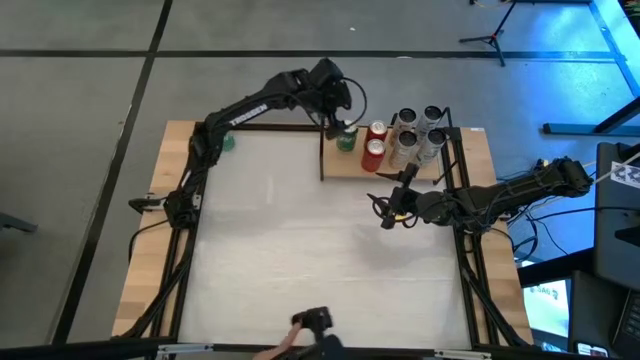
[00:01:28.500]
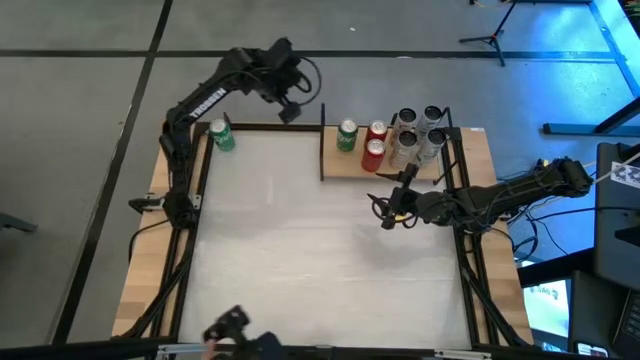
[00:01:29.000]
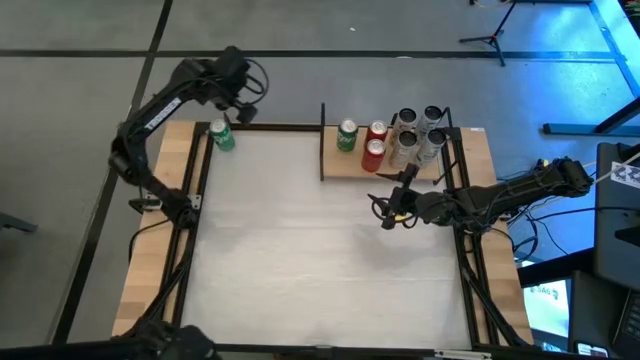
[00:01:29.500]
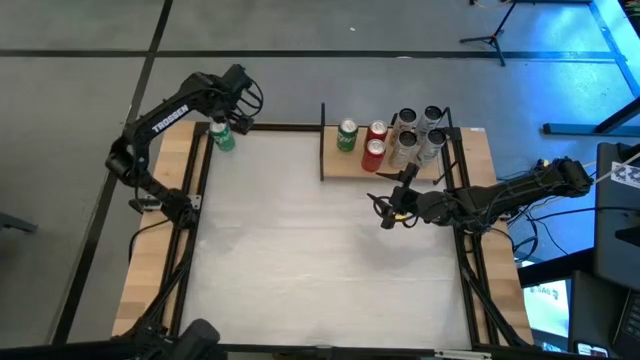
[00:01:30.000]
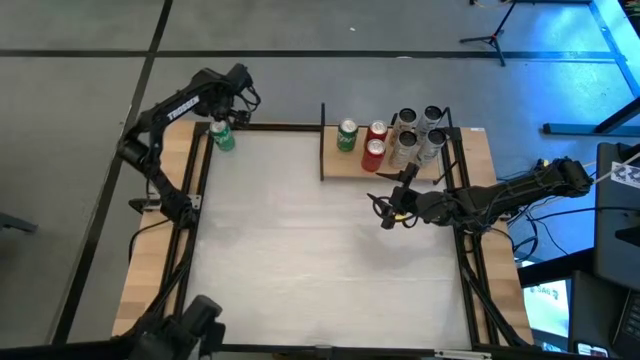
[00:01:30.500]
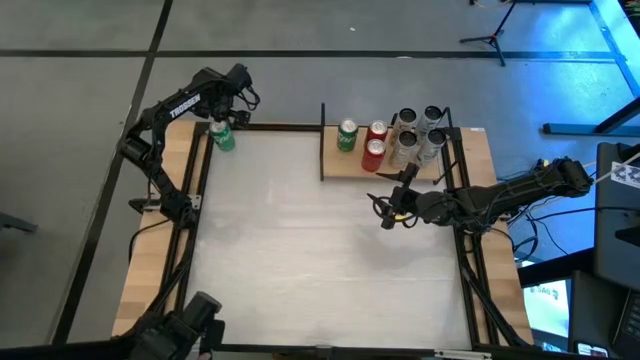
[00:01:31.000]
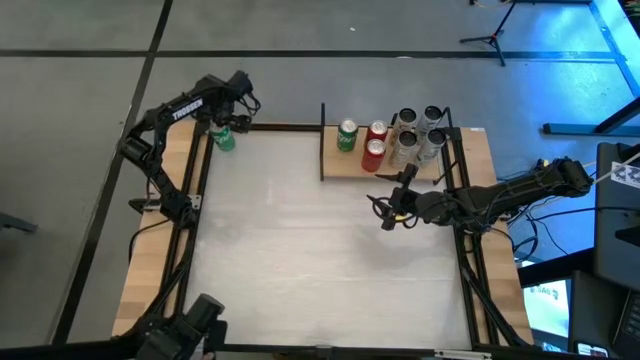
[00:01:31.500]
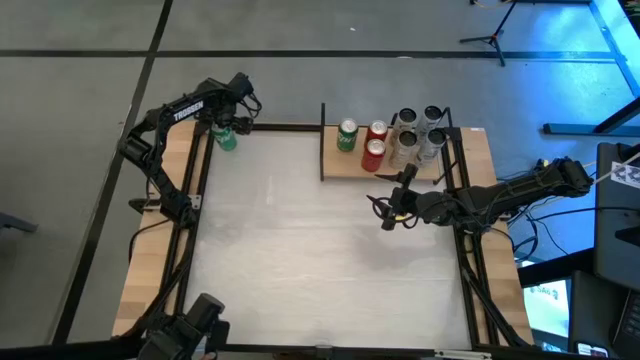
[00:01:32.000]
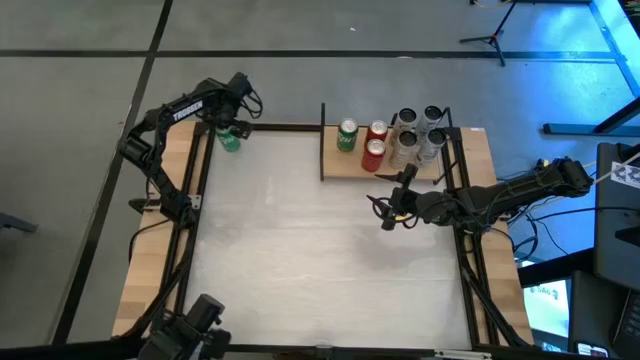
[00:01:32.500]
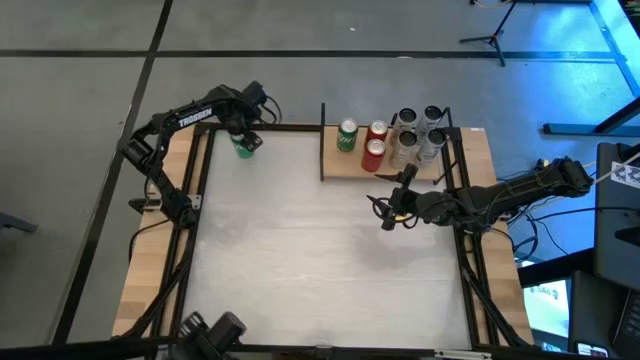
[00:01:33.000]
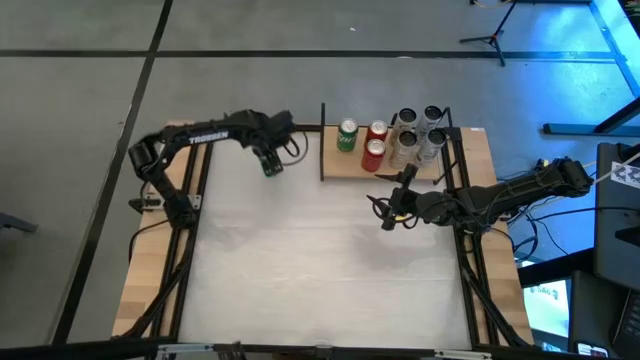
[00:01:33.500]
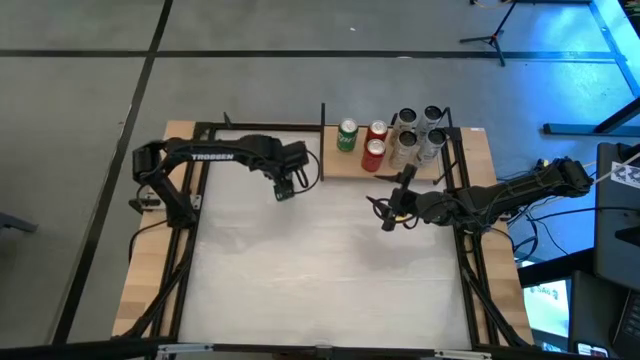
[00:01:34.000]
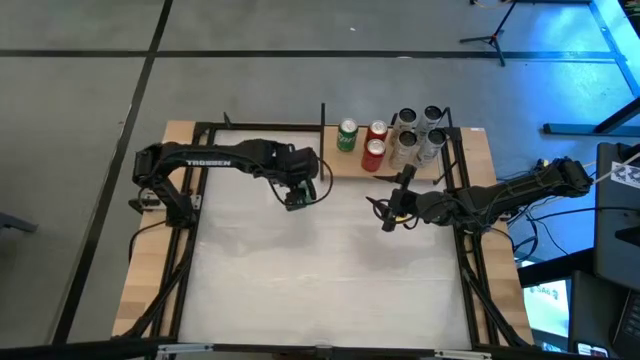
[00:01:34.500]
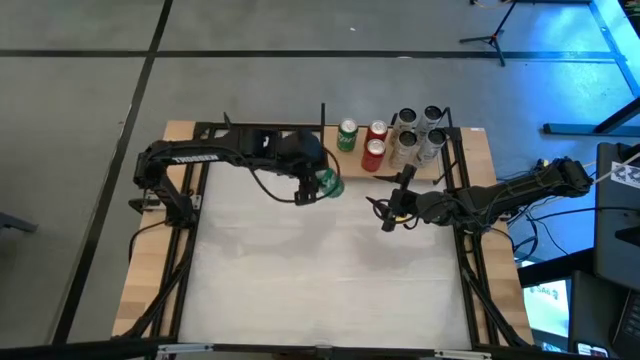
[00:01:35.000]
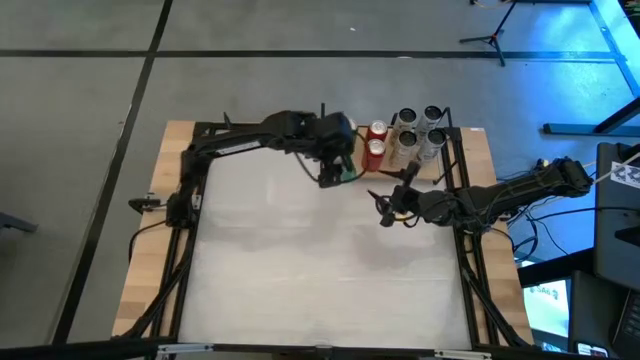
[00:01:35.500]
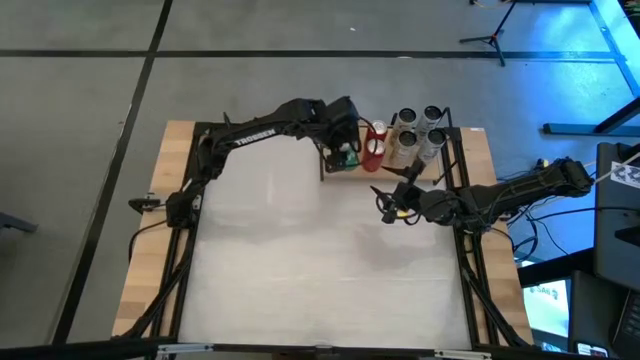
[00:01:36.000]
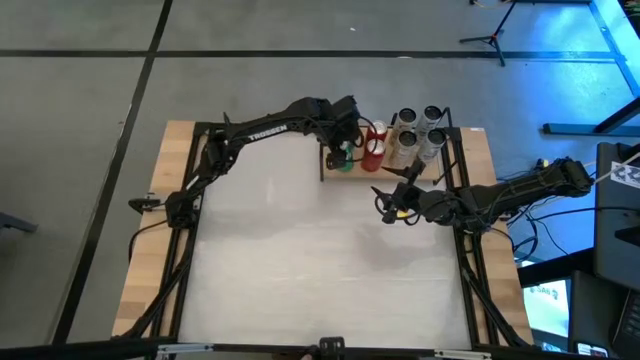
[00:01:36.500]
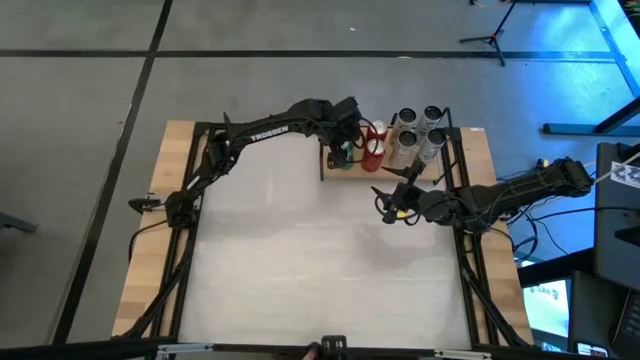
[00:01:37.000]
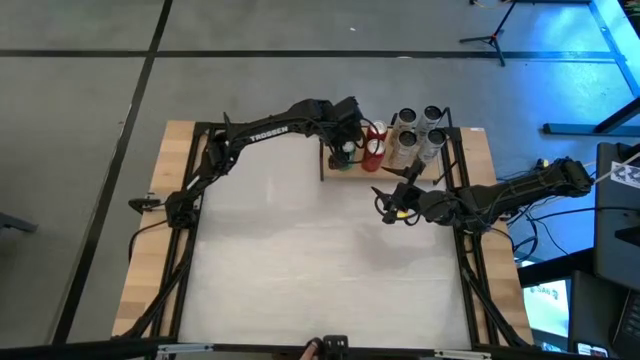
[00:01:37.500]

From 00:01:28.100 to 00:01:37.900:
Task: Place canned beverage on shelf
Put the green soda can on the shelf aligned with the other green soda can

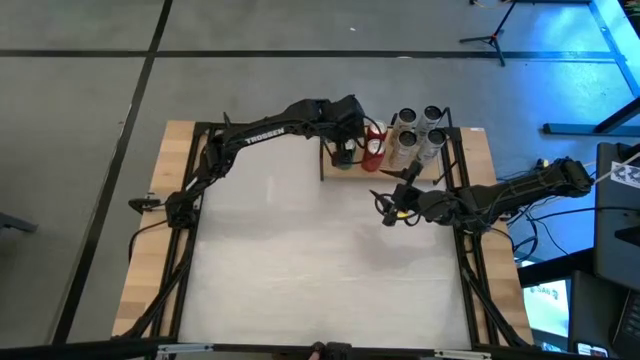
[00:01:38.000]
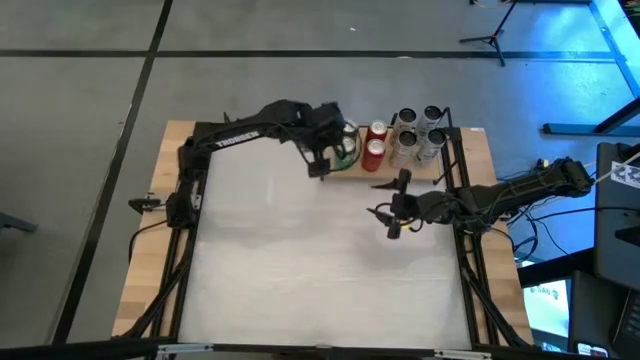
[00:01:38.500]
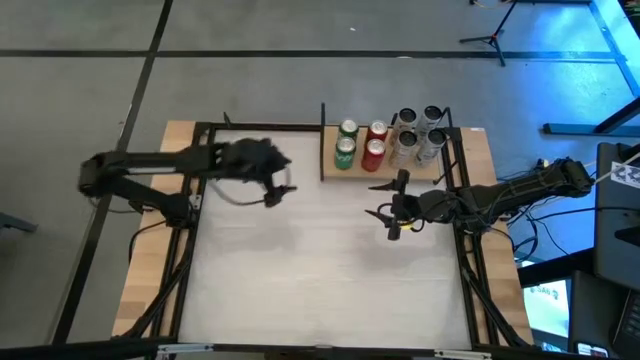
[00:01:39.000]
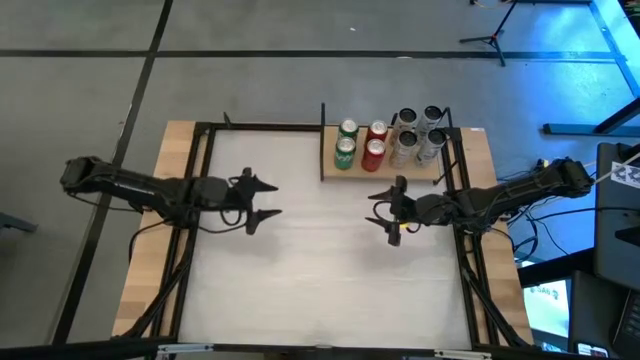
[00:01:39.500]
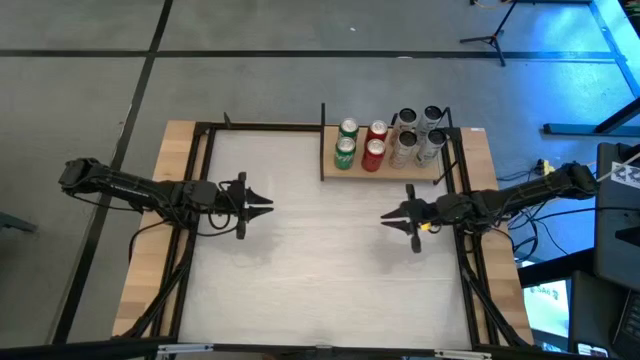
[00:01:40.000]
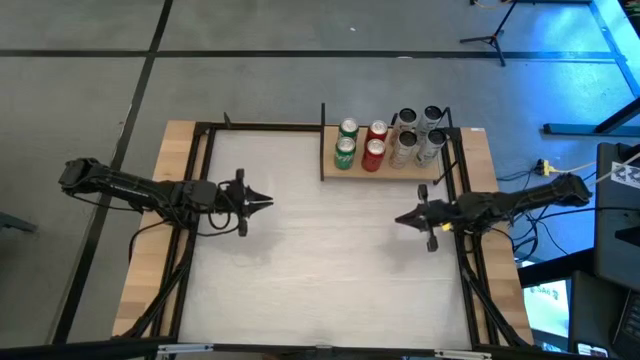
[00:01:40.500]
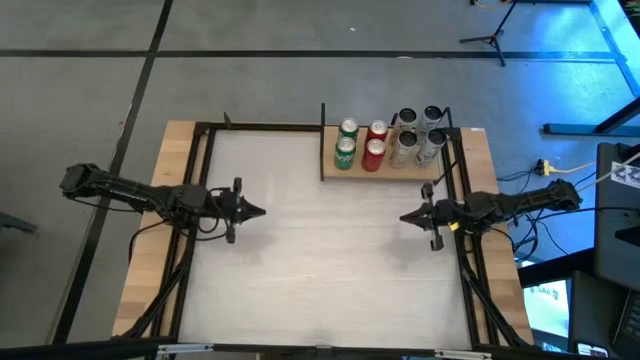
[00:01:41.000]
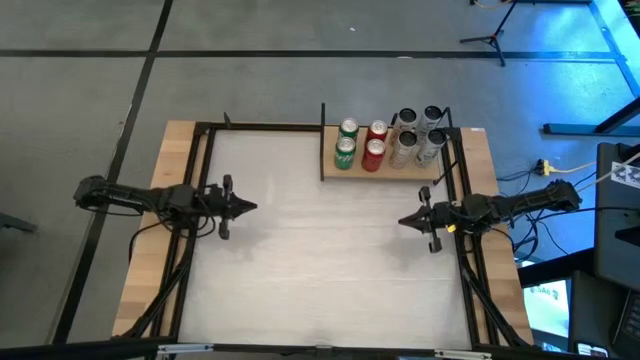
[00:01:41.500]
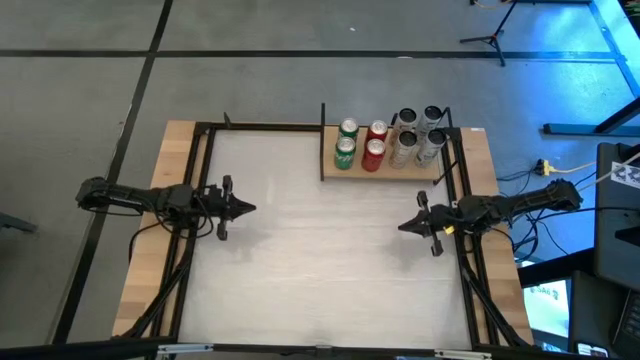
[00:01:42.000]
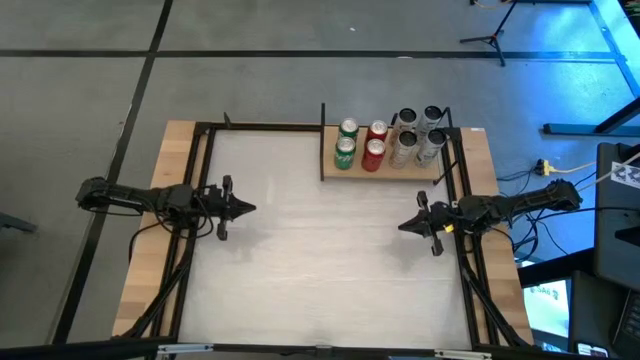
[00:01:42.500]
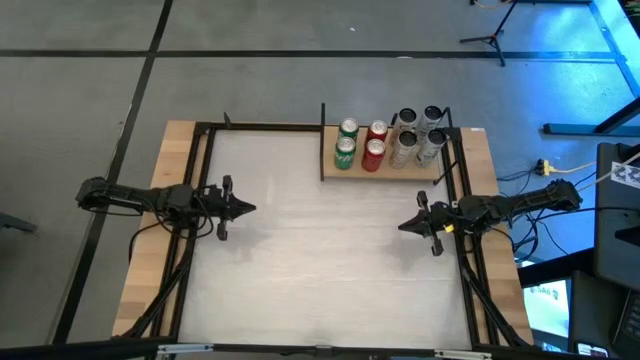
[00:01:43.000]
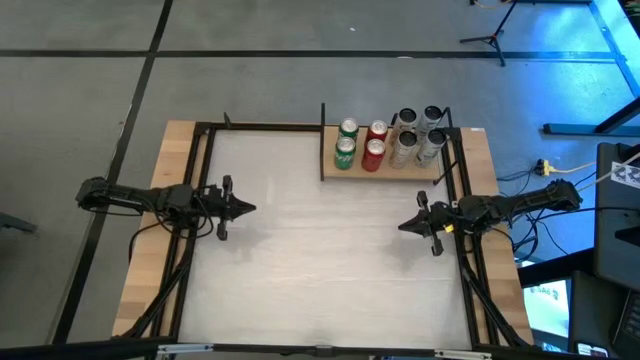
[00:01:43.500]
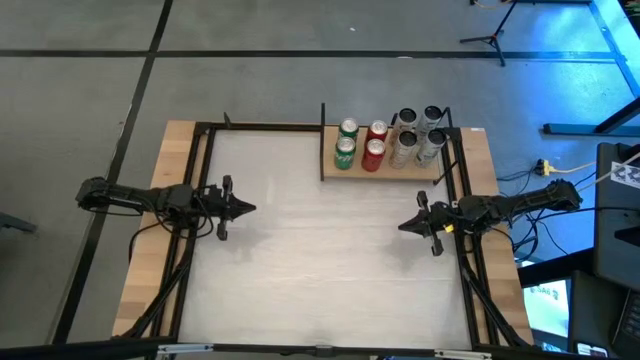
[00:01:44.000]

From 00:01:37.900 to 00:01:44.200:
Return to Home position

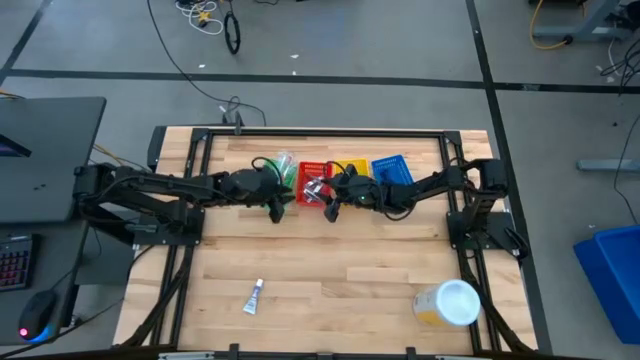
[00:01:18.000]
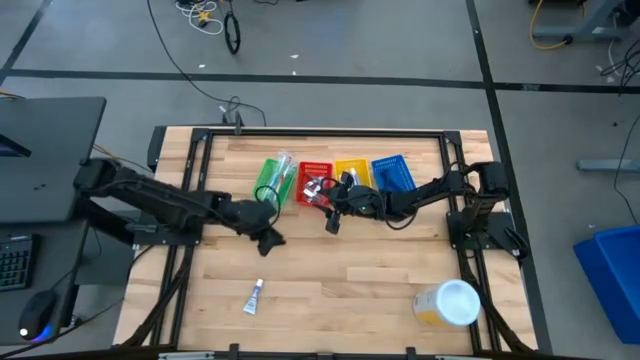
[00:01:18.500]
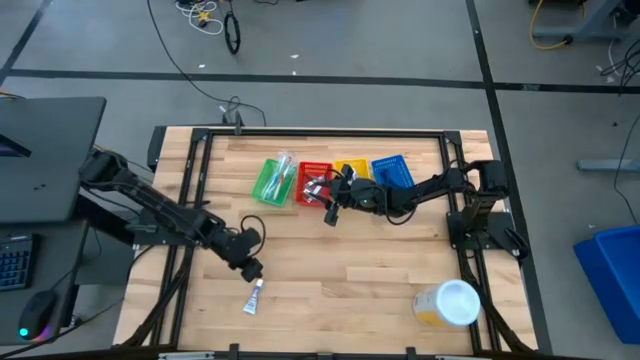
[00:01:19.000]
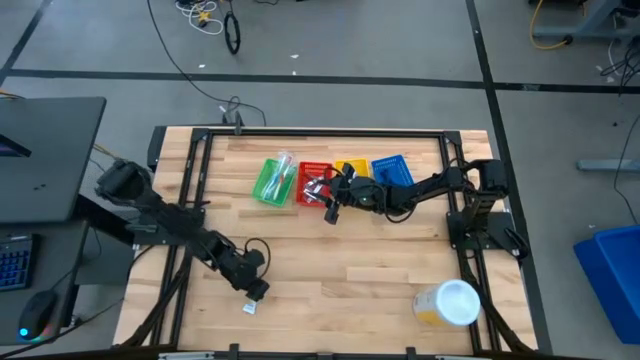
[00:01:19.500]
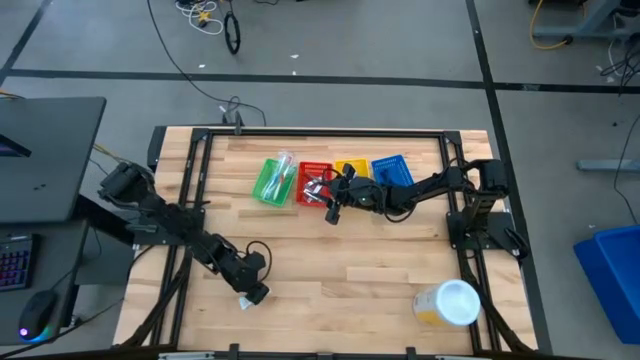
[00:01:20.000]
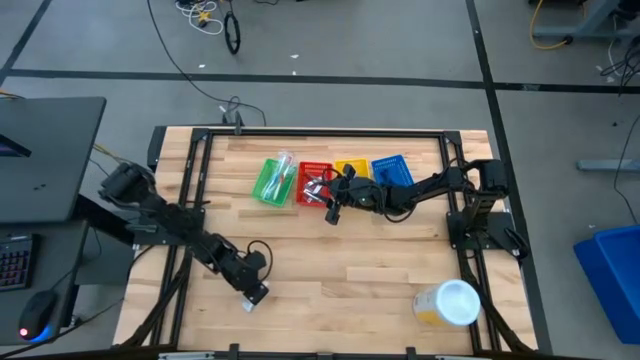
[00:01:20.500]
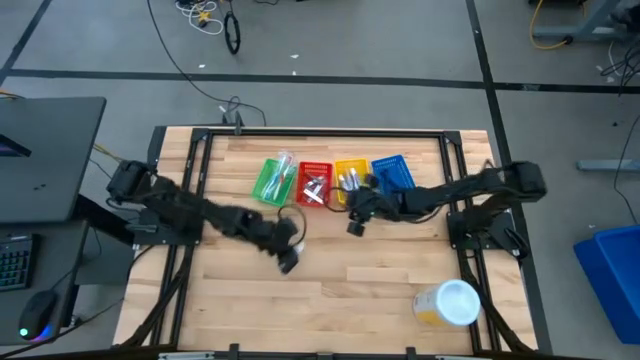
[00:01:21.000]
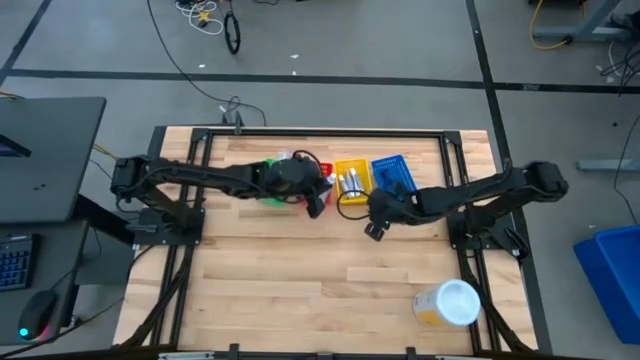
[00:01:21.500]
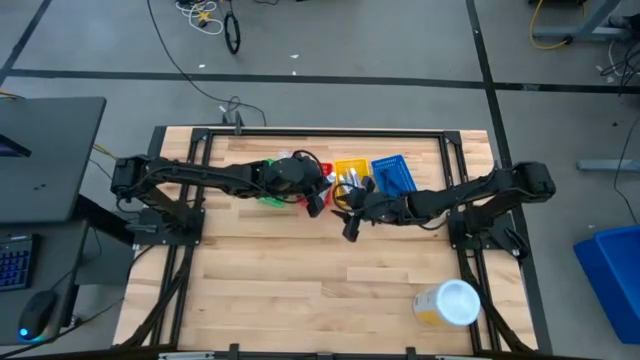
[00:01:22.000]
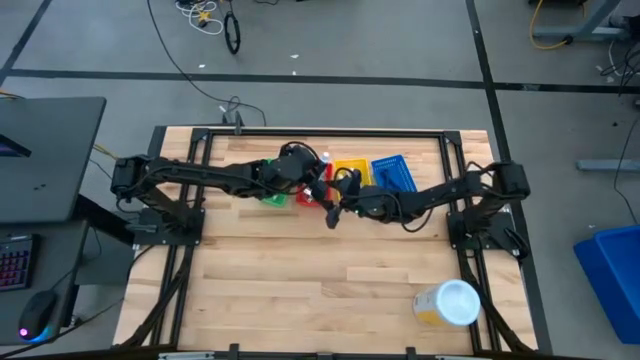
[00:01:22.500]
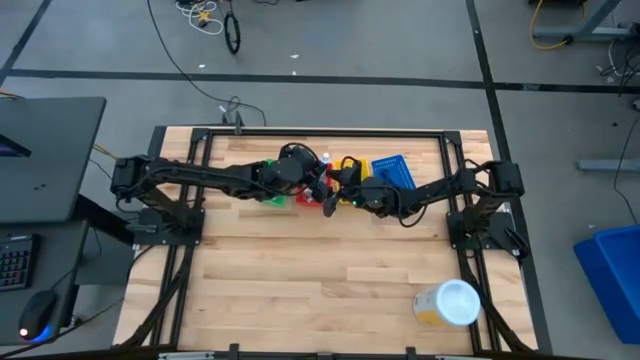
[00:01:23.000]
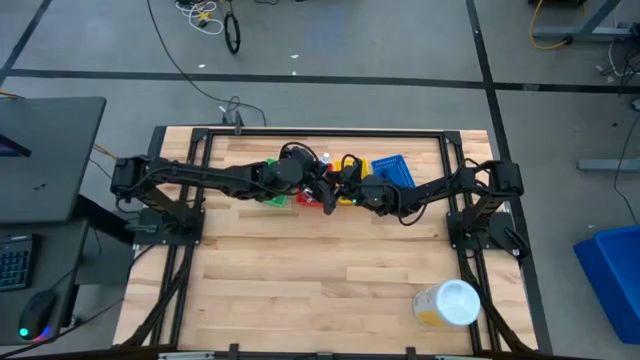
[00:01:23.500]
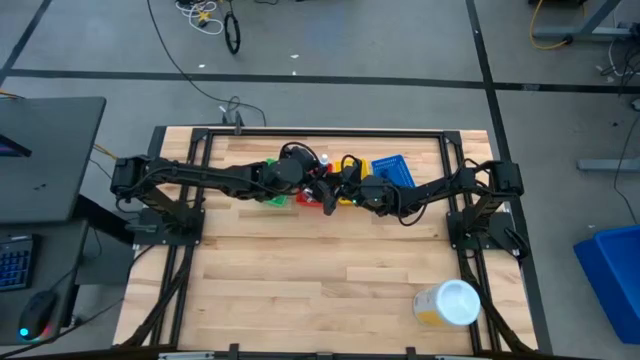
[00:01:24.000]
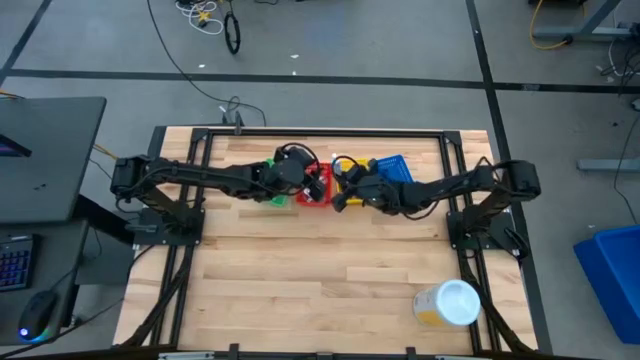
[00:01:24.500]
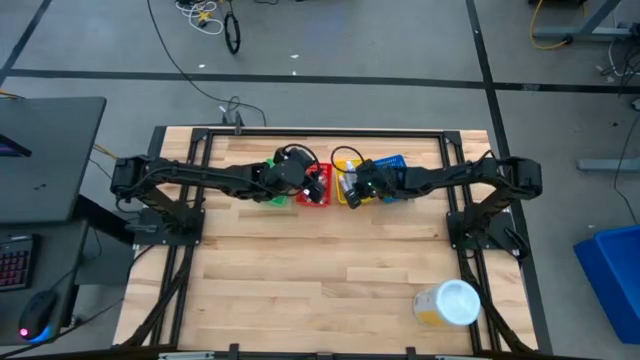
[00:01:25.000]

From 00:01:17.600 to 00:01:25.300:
Task: Pick & Place Travel size toiletries
Put the white toothpaste into the yellow bin
